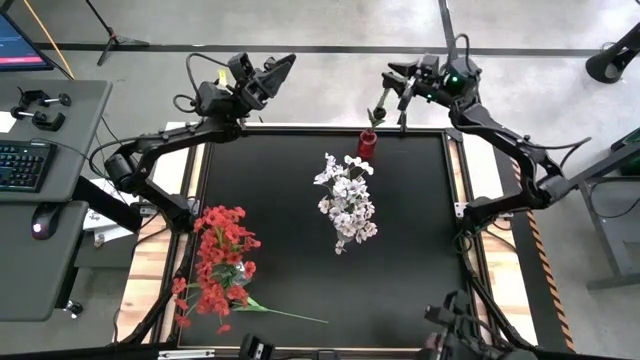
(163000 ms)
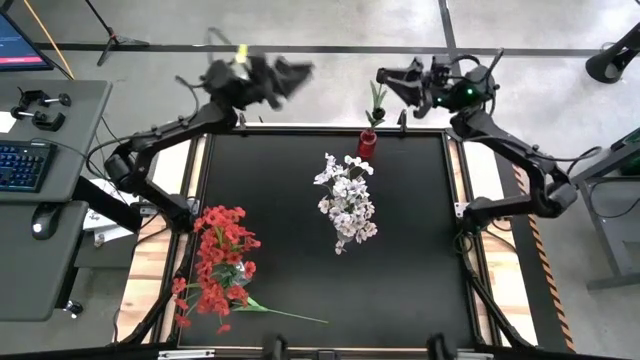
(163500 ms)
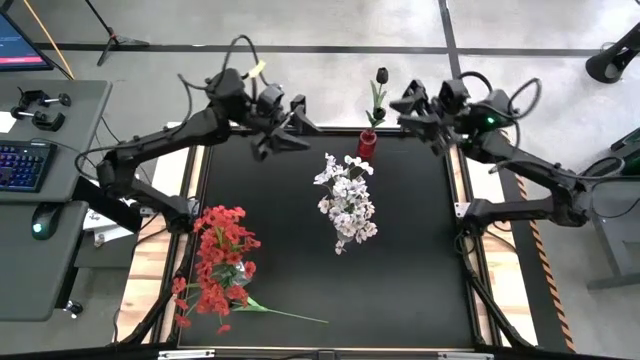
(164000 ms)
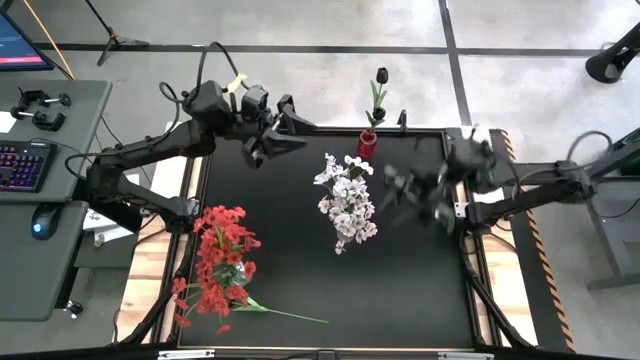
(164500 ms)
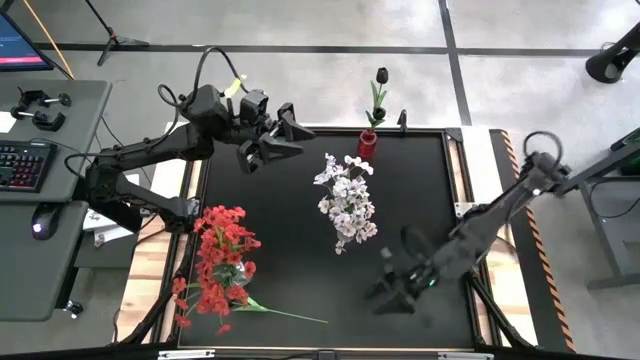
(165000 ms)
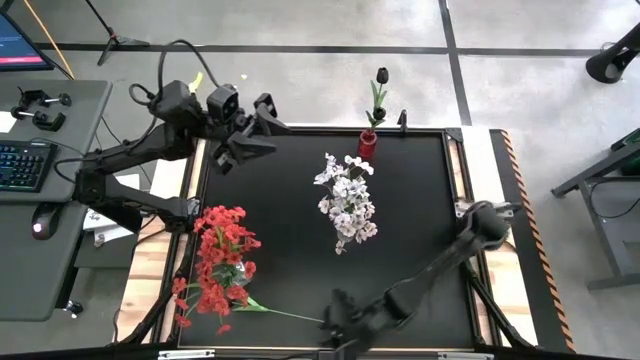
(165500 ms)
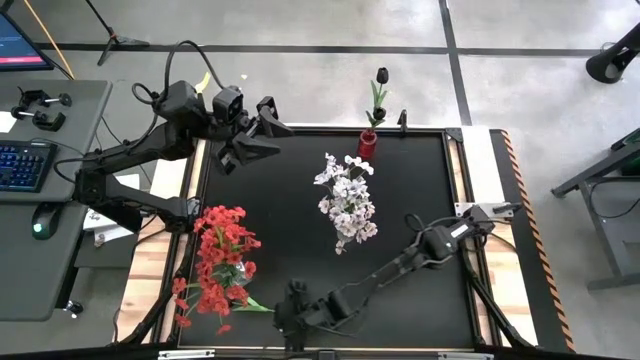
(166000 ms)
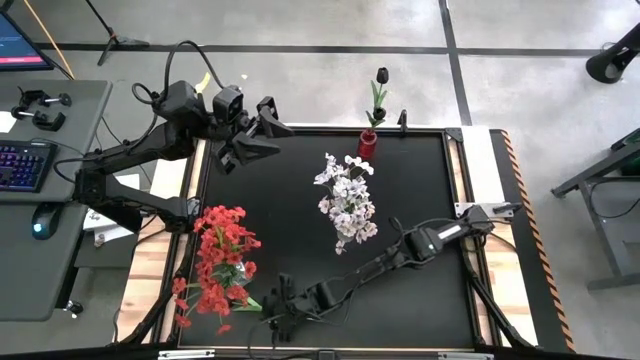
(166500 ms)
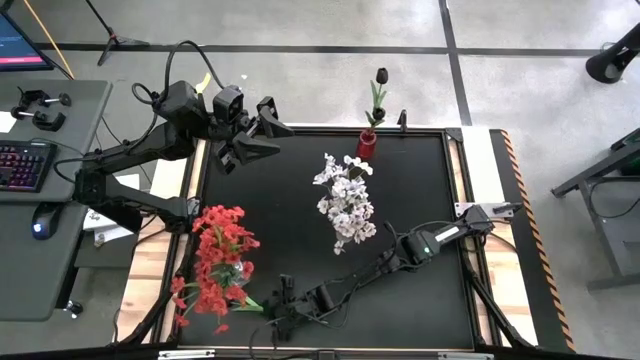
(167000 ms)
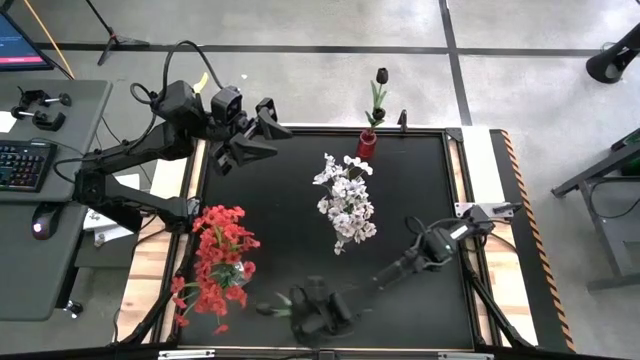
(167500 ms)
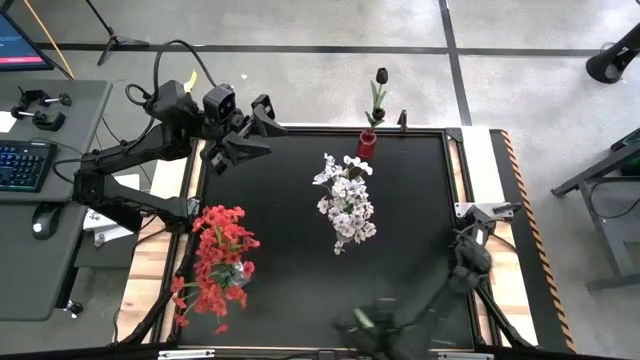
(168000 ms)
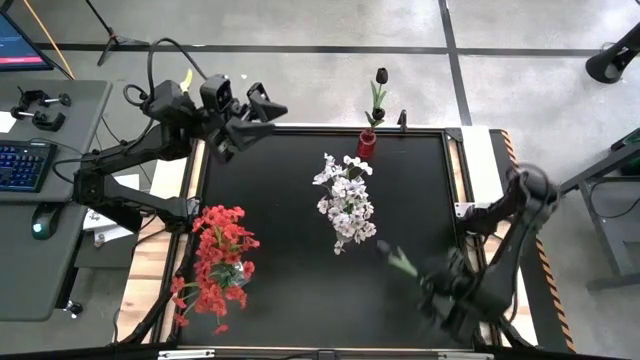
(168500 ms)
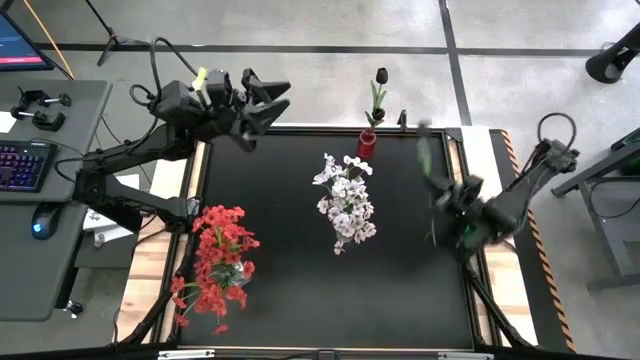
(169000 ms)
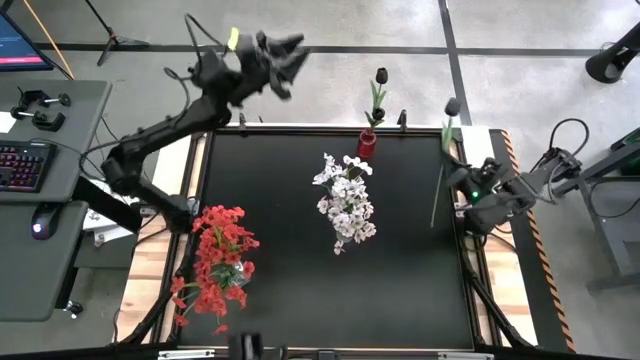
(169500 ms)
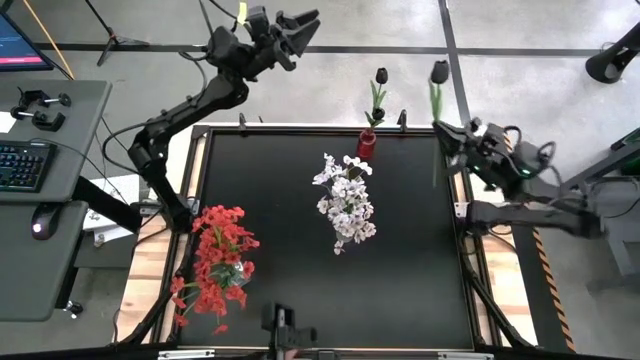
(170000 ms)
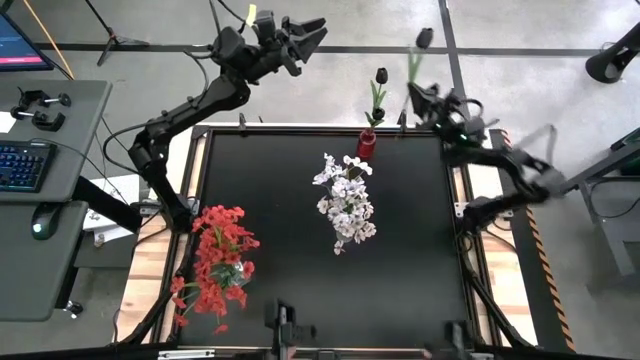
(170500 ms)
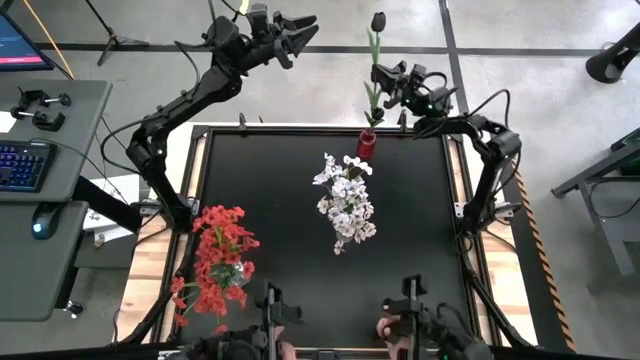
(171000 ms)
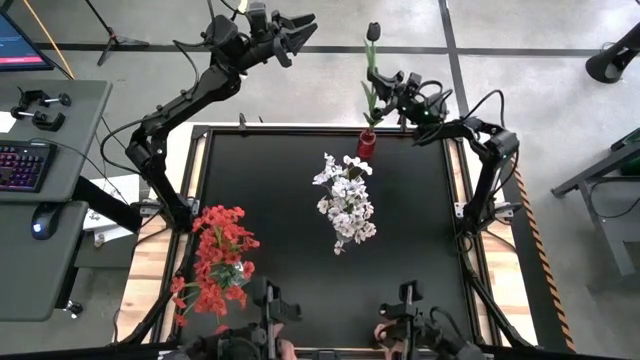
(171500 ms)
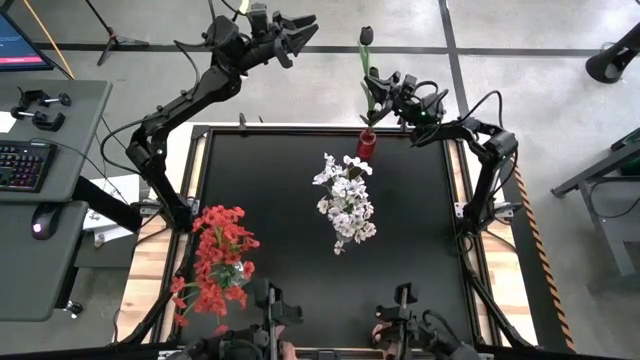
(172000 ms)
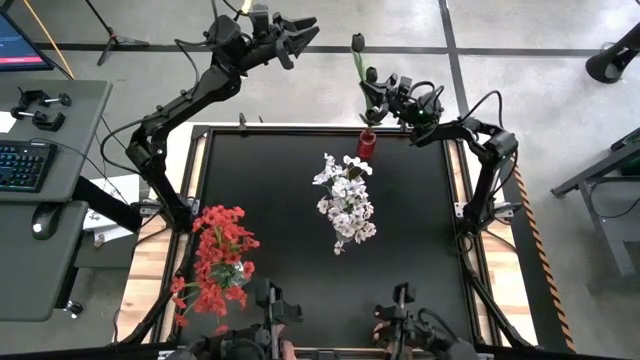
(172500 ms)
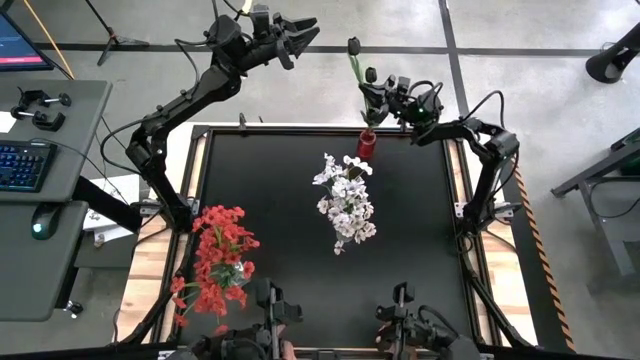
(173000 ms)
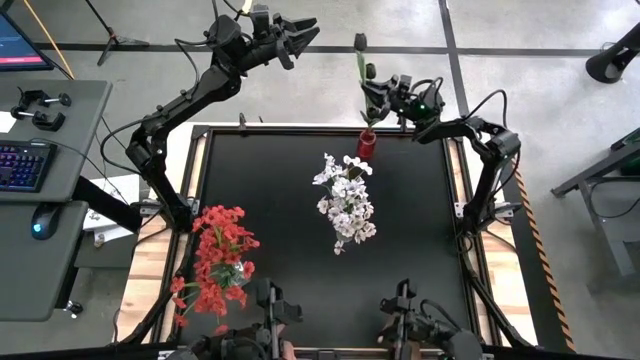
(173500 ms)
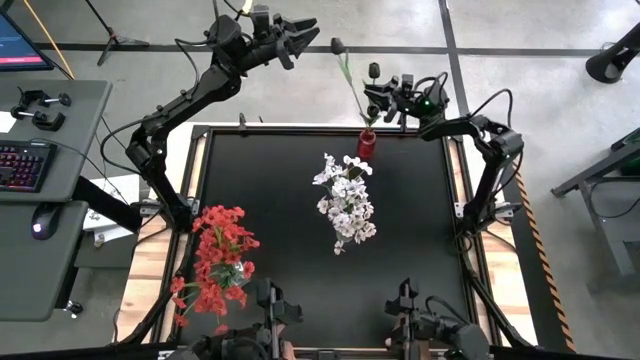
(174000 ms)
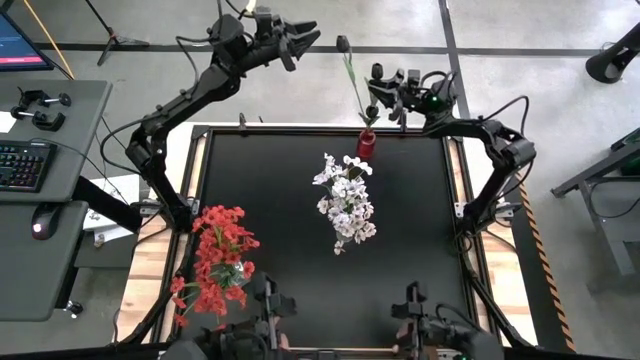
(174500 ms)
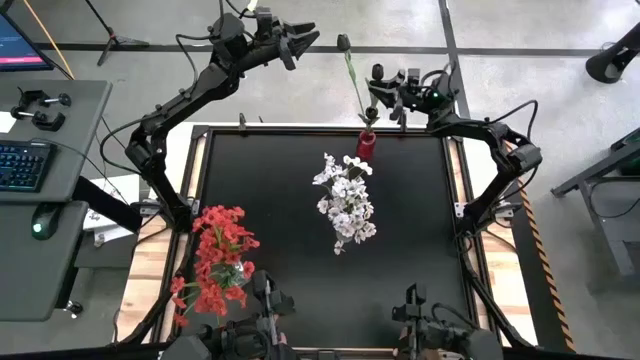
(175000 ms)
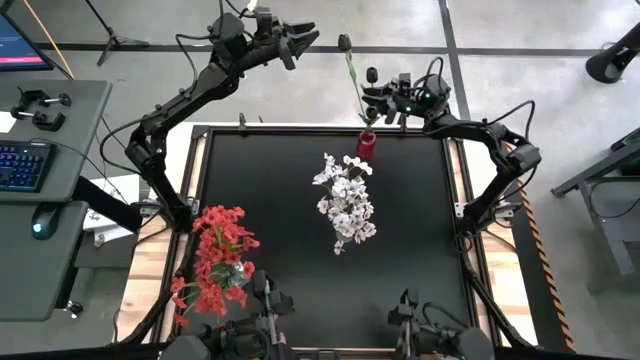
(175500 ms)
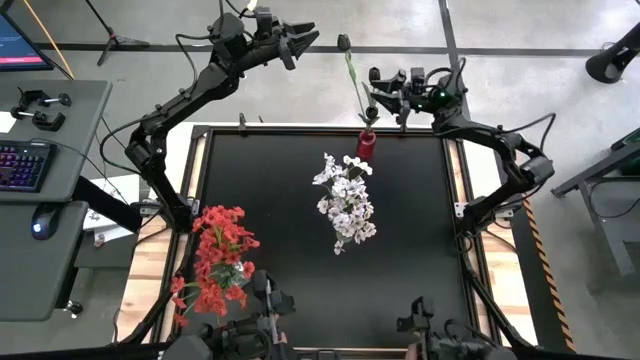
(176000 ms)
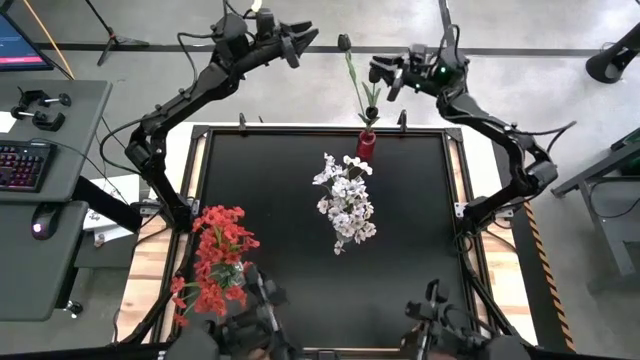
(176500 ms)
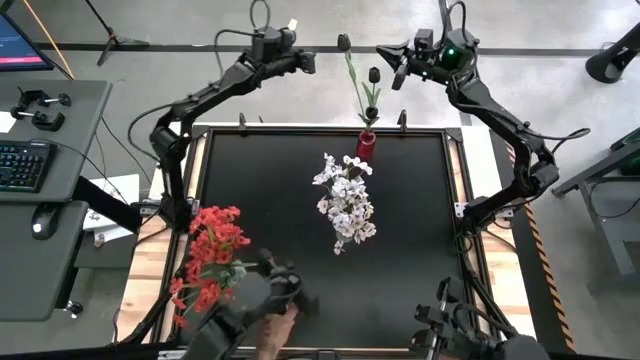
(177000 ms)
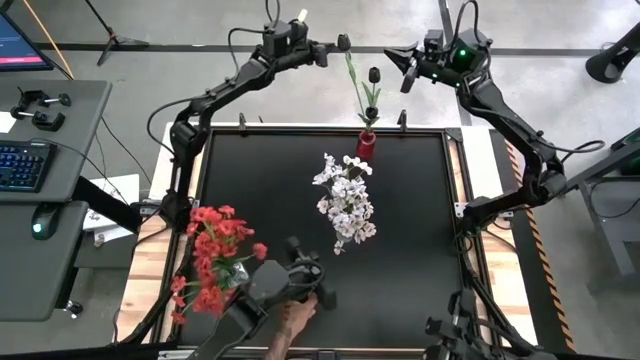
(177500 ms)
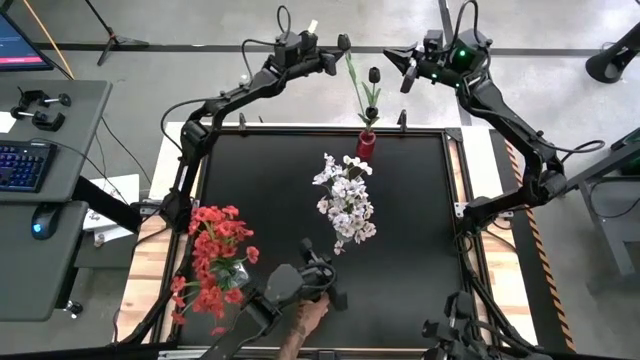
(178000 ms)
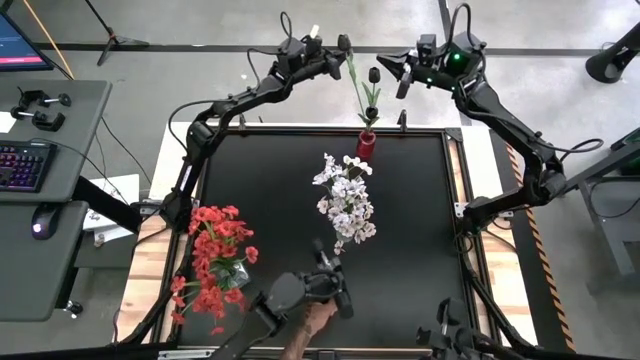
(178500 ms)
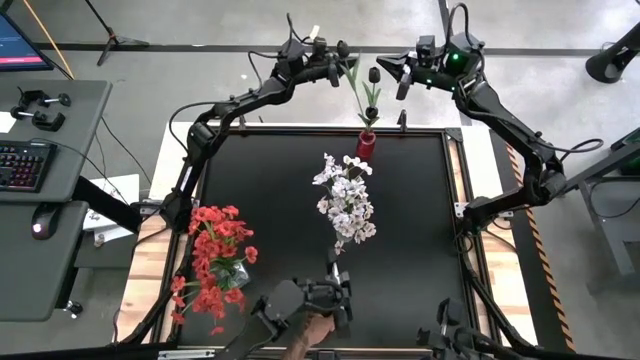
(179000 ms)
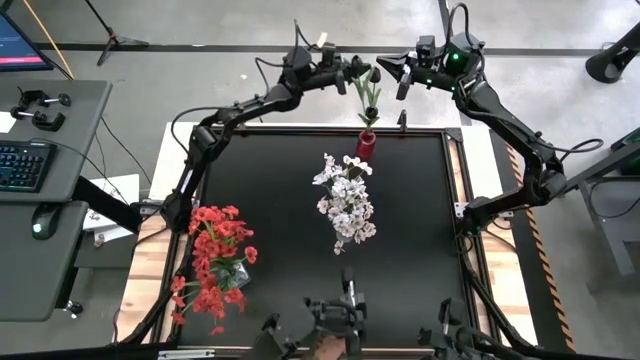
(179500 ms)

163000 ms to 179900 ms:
Task: Sort flowers into vase by color
Put the black tulip into the red vase

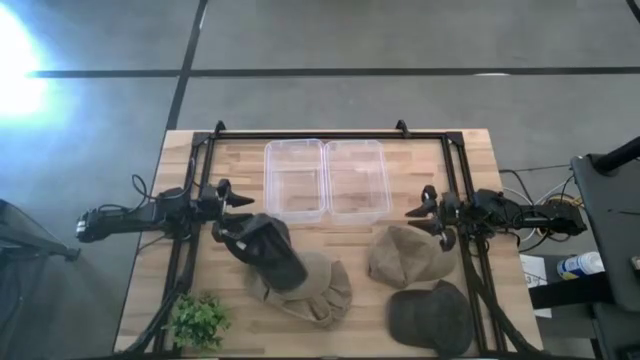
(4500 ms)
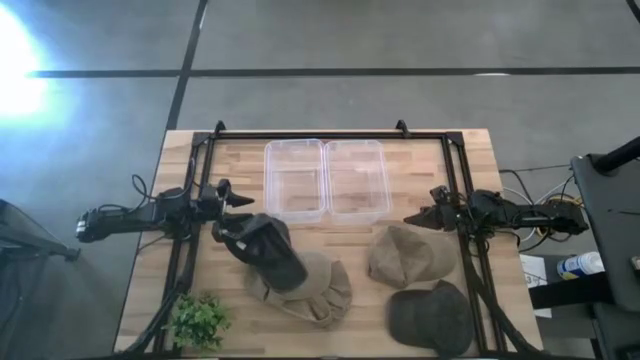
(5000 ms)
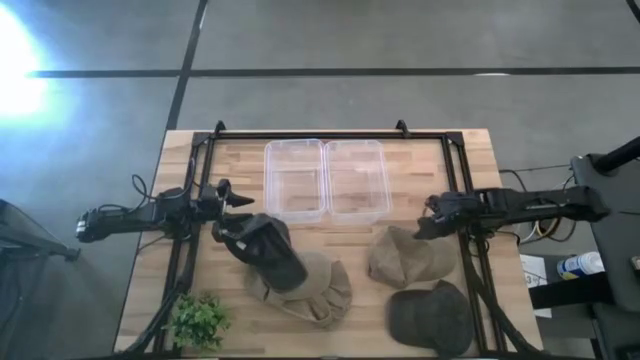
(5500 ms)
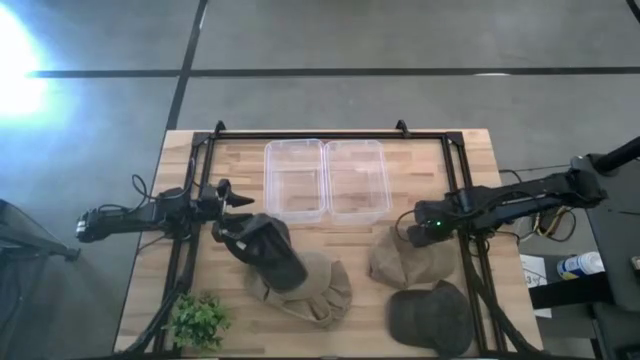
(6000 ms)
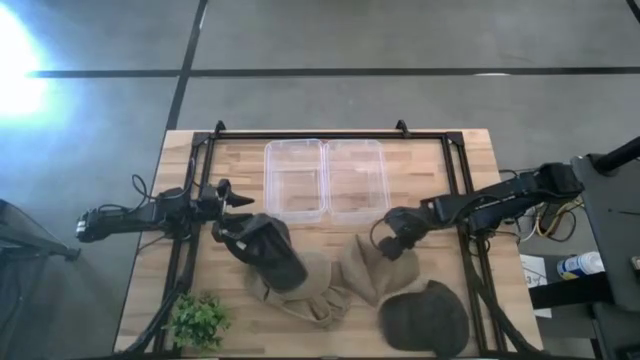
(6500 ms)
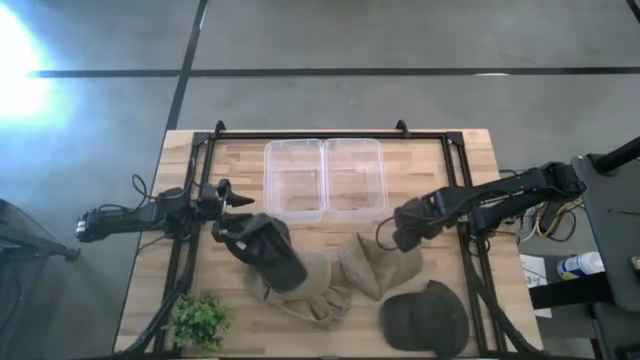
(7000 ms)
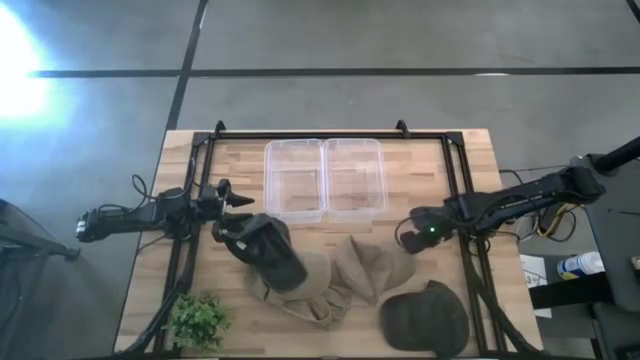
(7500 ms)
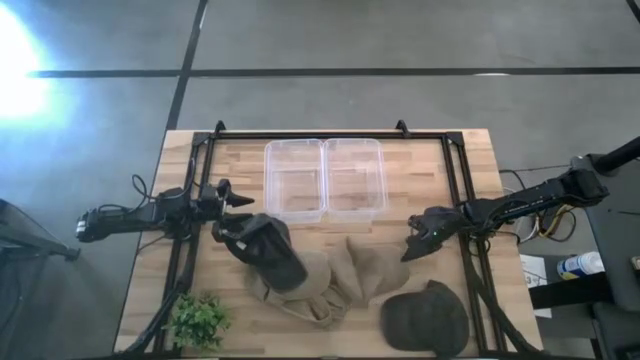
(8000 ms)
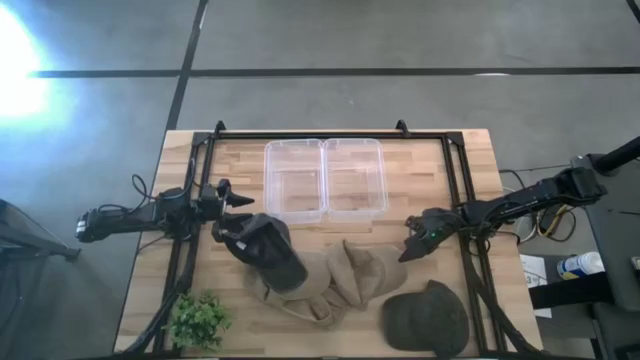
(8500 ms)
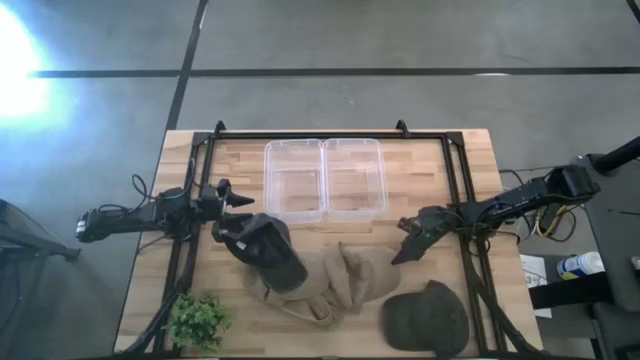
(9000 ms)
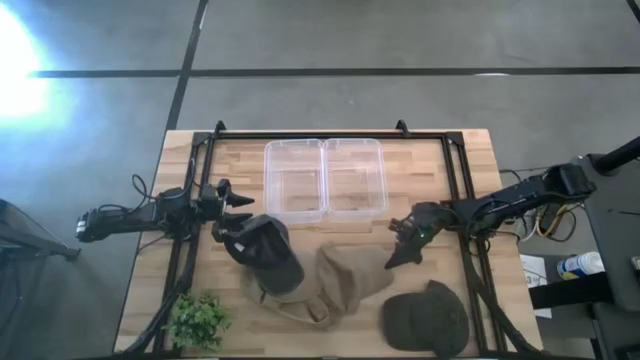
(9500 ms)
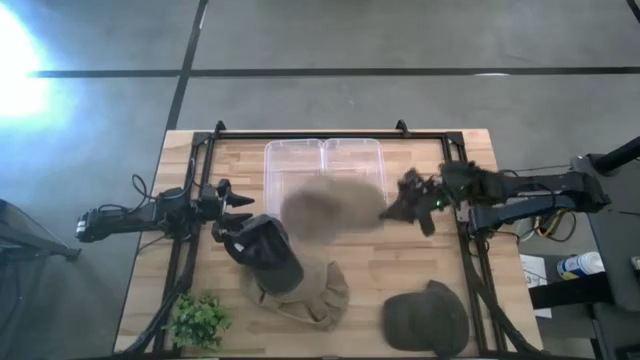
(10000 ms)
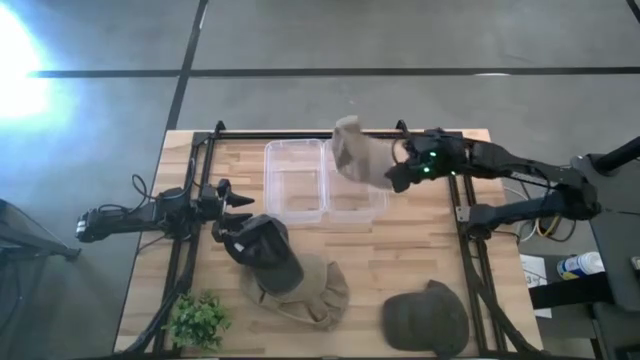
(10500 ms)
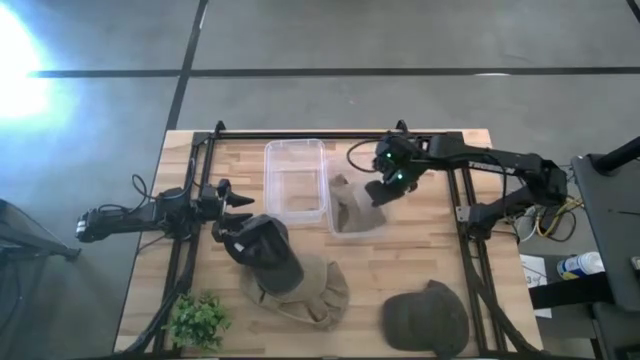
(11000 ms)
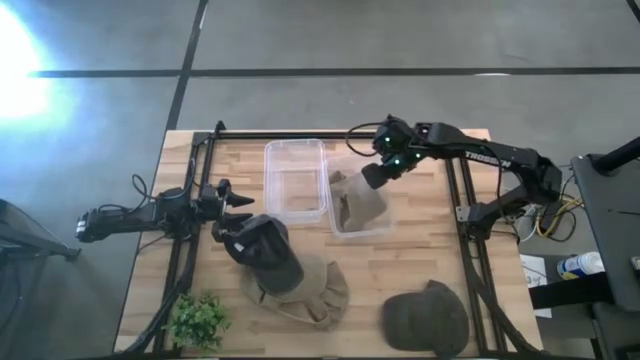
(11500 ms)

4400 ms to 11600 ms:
Task: Pick & Place hat
Put the right brown cap into the right transparent bin
